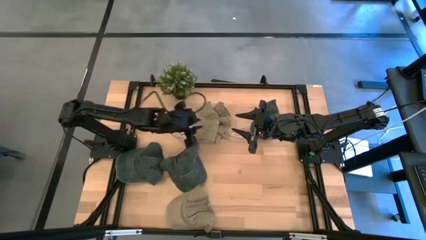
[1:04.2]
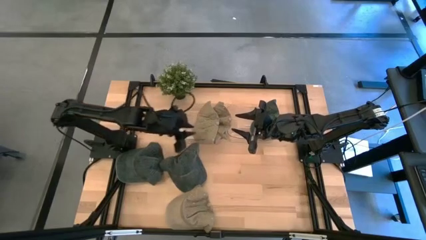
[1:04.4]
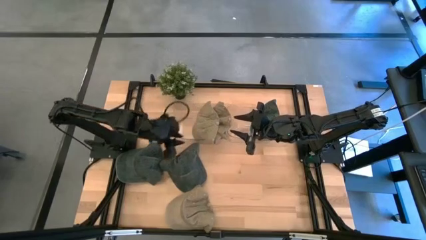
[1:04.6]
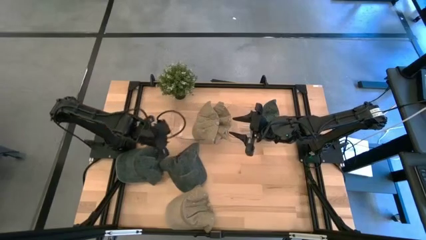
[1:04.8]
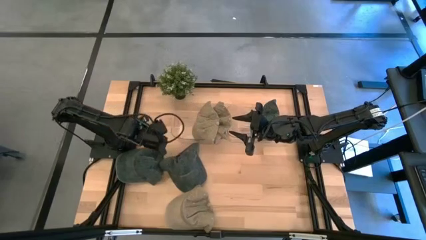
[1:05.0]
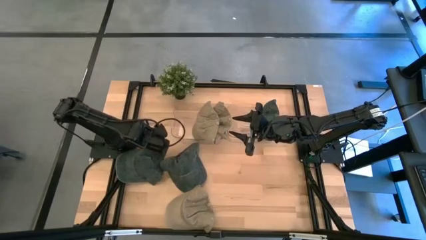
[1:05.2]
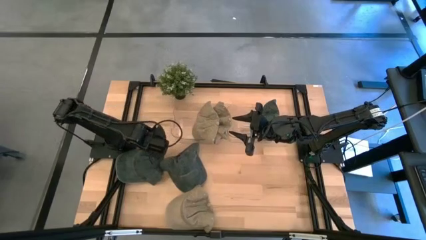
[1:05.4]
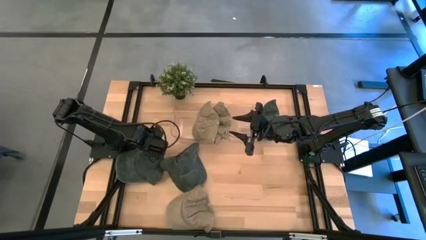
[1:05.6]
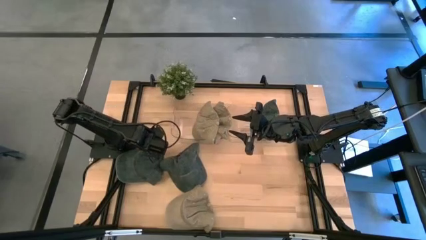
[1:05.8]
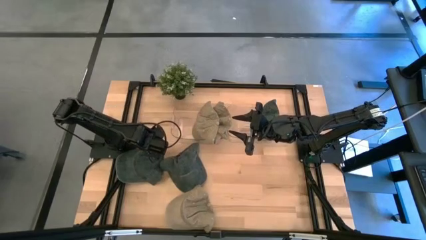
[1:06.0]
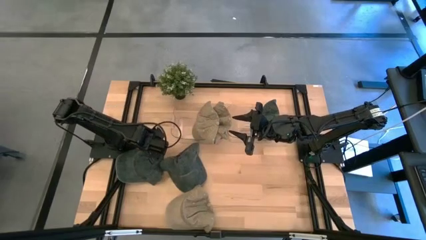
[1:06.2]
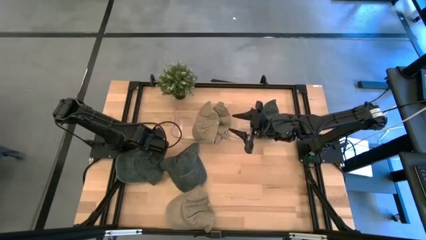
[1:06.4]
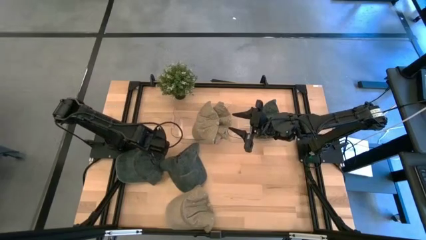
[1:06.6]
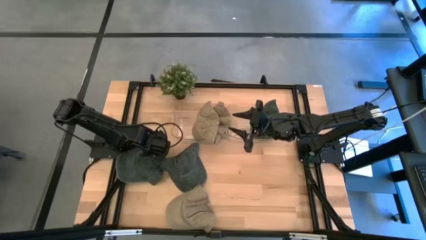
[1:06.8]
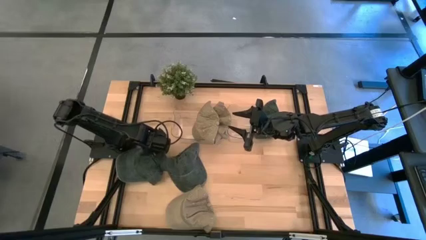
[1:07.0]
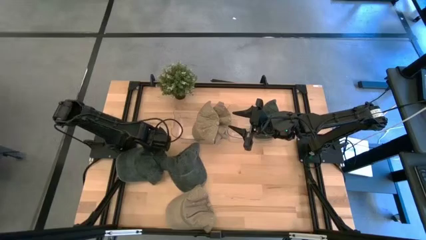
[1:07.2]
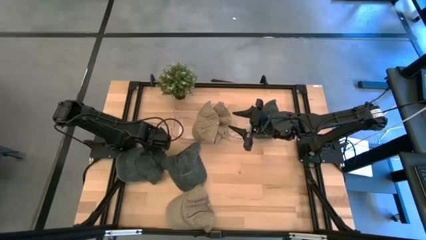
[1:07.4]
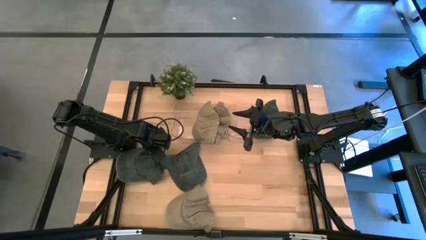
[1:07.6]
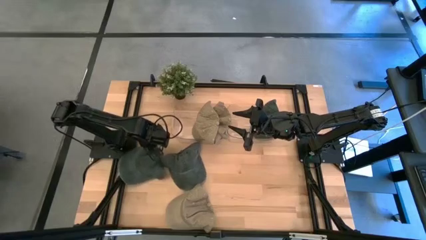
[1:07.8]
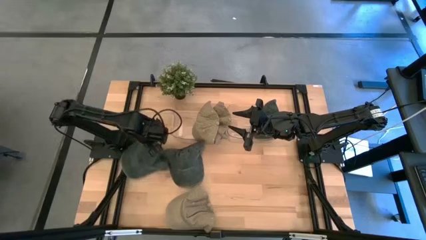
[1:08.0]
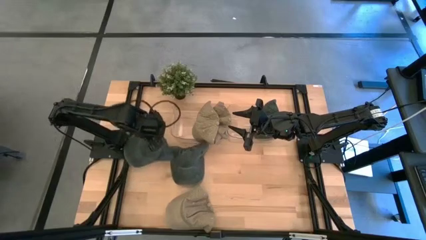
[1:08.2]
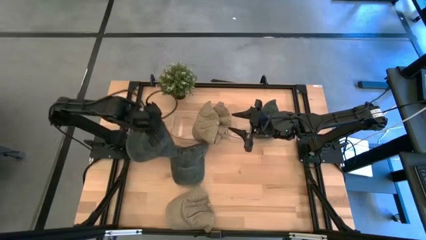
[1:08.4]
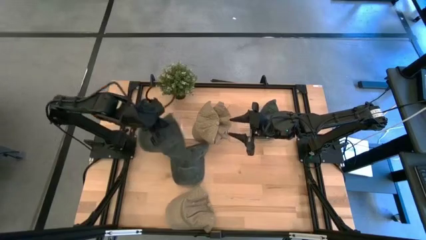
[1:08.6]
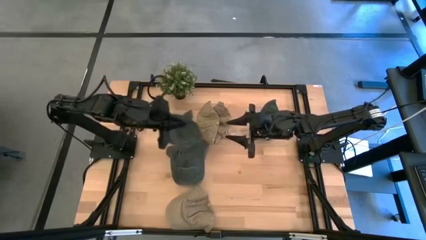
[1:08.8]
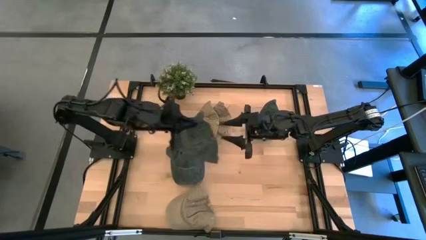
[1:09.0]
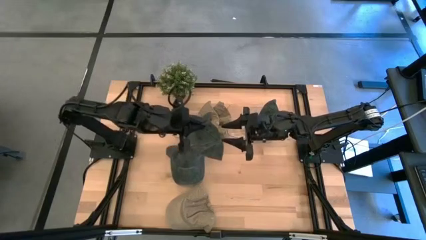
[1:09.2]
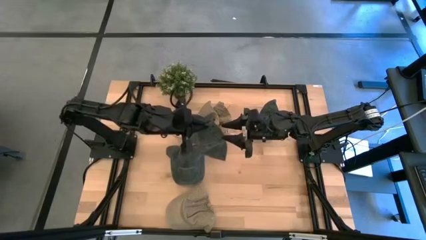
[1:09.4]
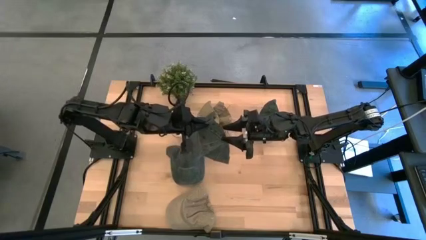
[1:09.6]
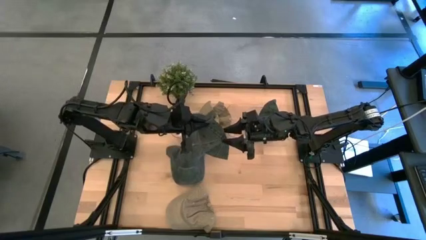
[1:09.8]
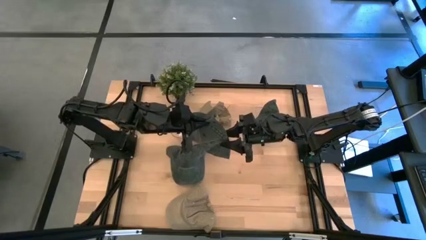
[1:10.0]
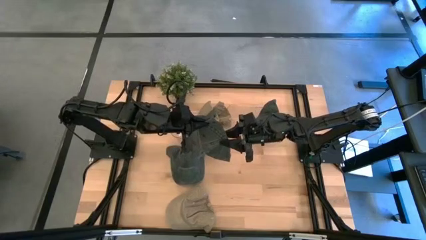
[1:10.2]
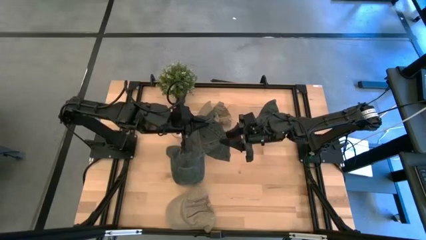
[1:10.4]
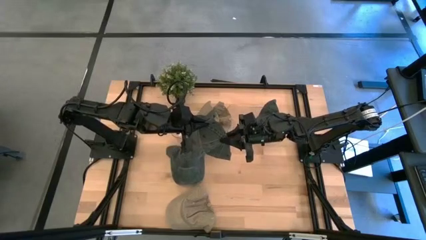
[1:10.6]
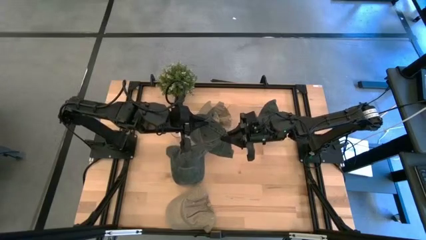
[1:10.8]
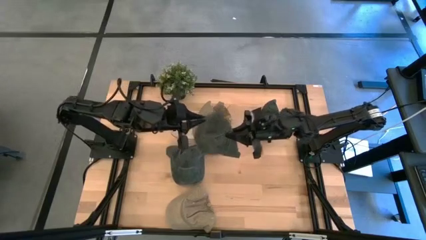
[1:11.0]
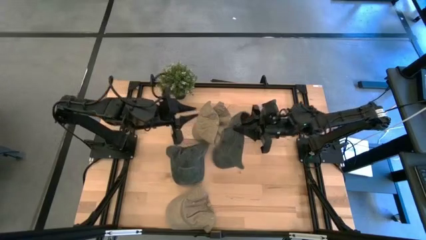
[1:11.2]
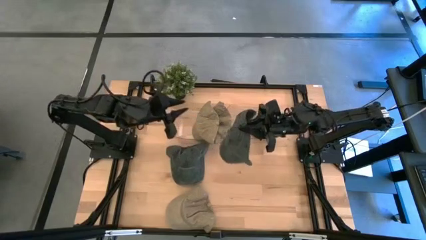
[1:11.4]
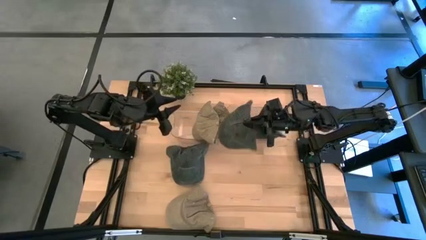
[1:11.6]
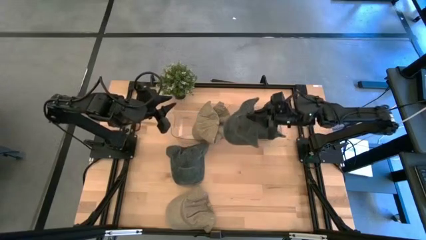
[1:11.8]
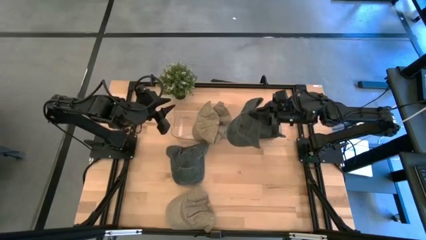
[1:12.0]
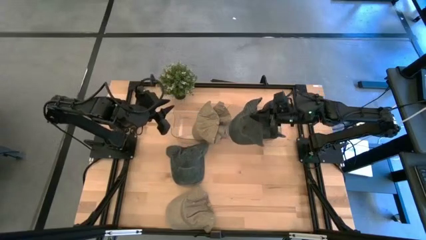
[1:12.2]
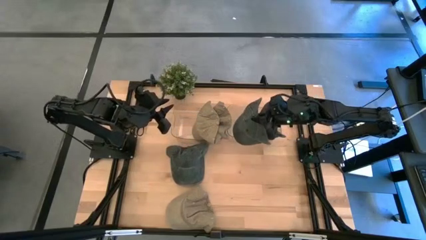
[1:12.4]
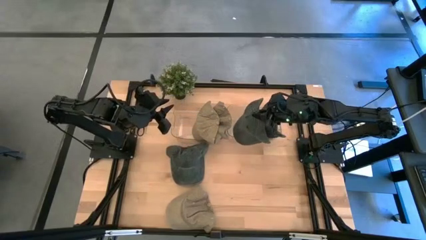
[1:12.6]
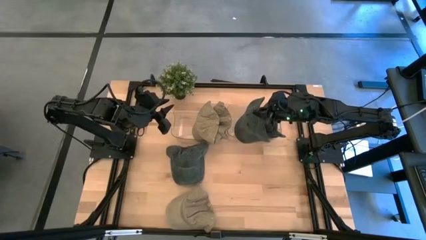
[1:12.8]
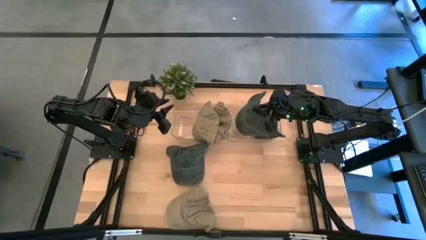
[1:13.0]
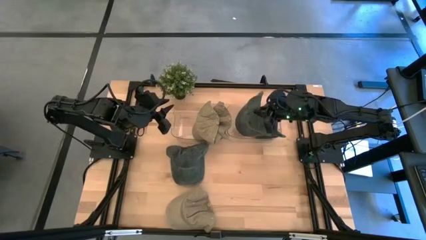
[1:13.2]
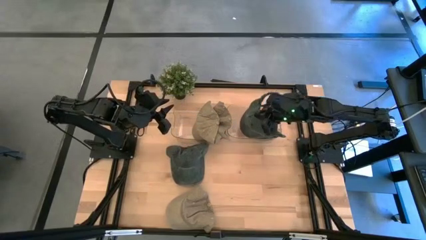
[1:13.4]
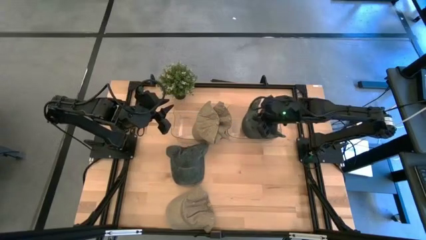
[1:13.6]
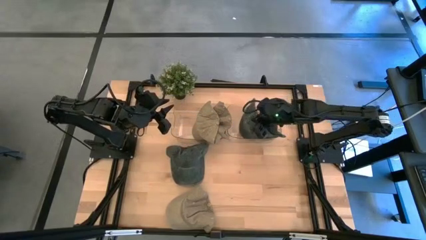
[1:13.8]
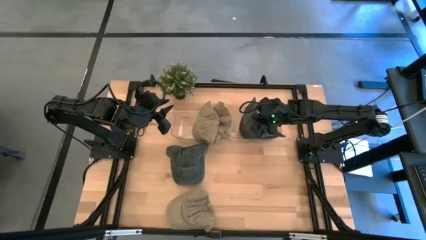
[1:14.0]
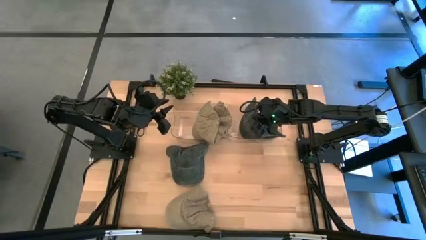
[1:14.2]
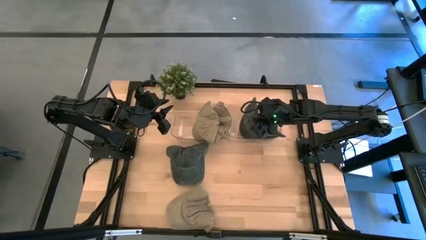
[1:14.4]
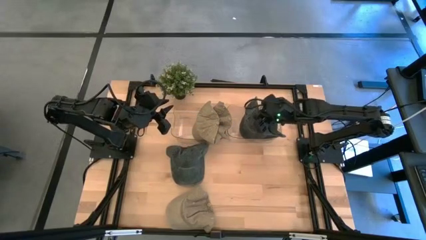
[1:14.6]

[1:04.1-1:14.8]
Task: Pick & Place hat
Put the left black cap into the right transparent bin
